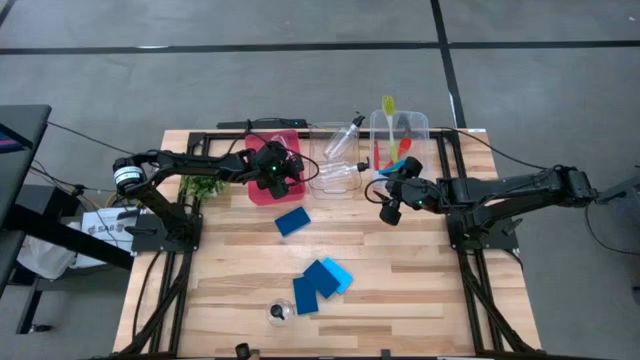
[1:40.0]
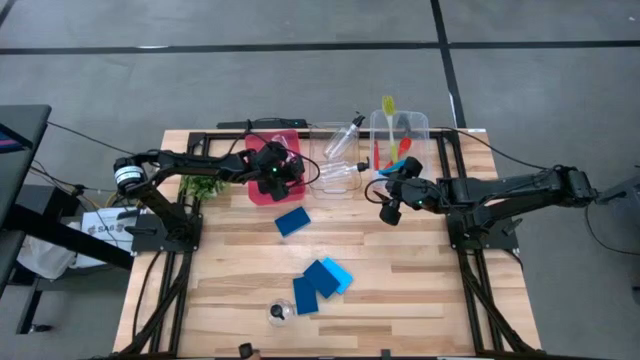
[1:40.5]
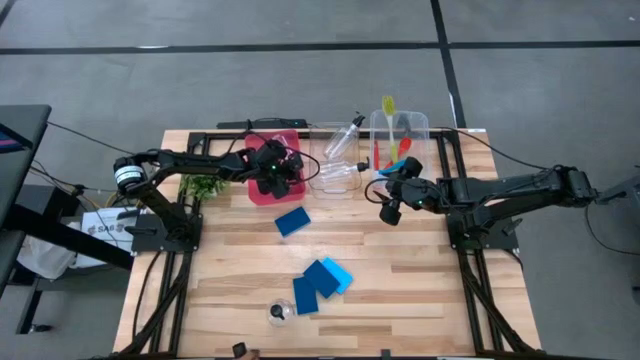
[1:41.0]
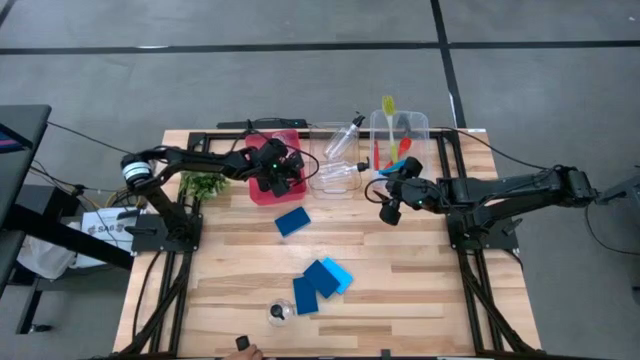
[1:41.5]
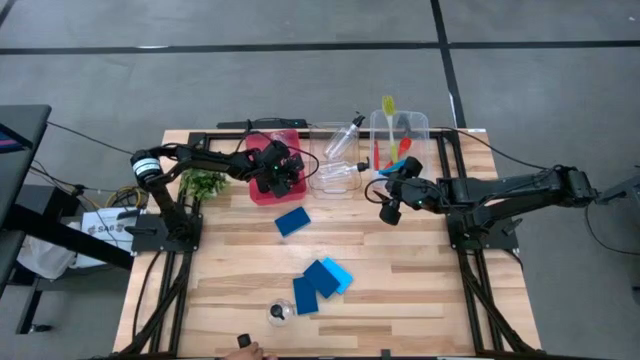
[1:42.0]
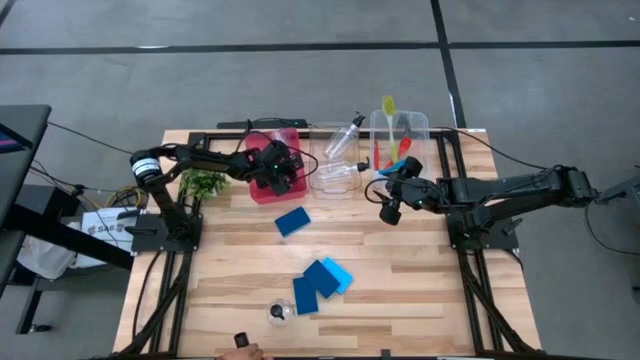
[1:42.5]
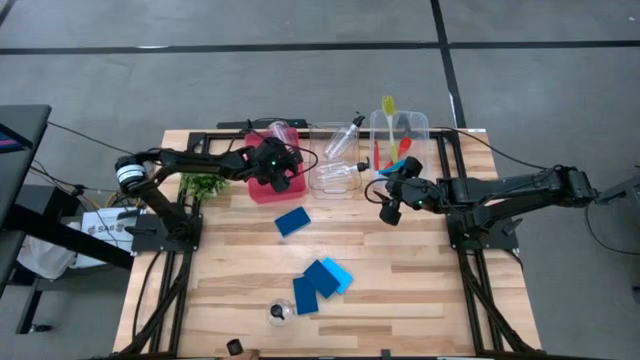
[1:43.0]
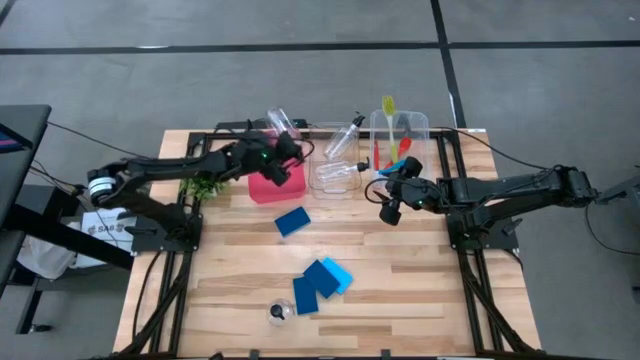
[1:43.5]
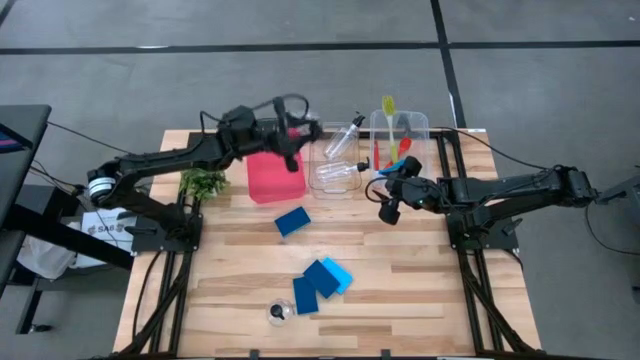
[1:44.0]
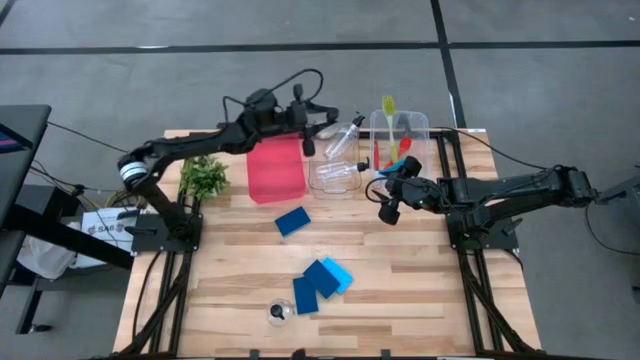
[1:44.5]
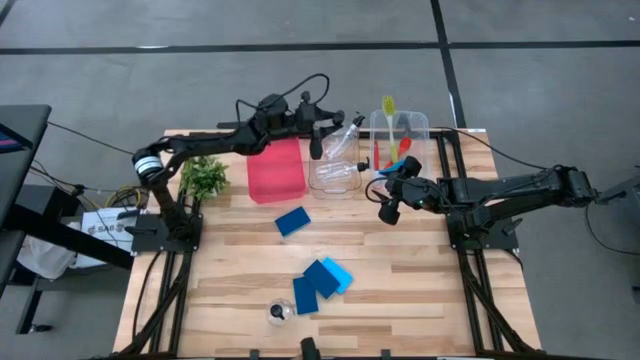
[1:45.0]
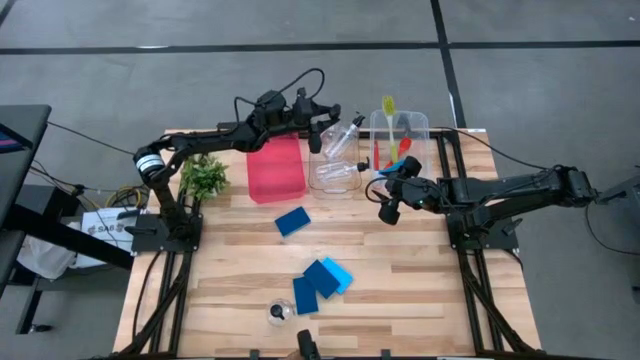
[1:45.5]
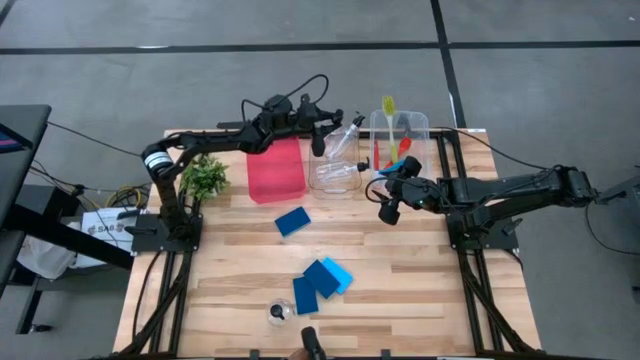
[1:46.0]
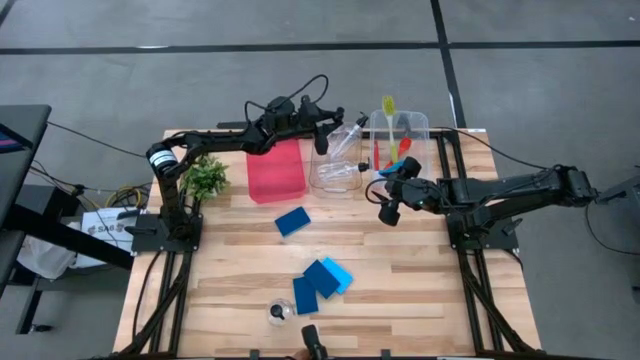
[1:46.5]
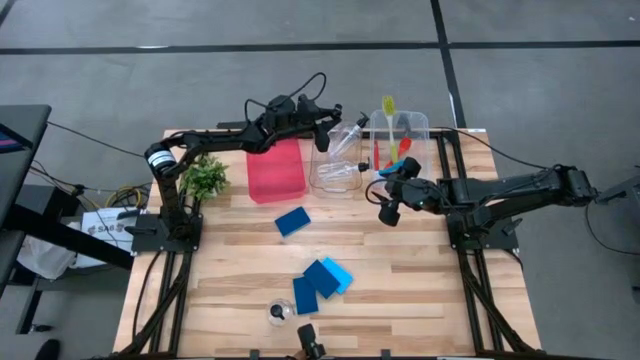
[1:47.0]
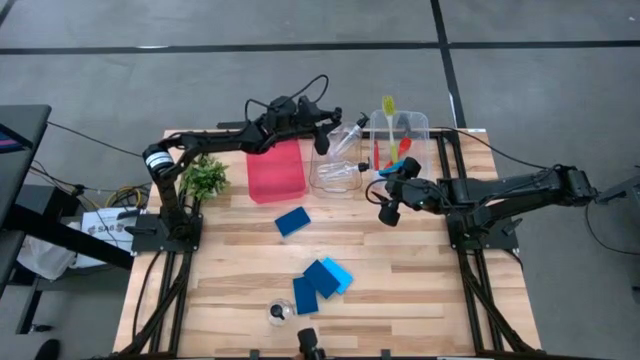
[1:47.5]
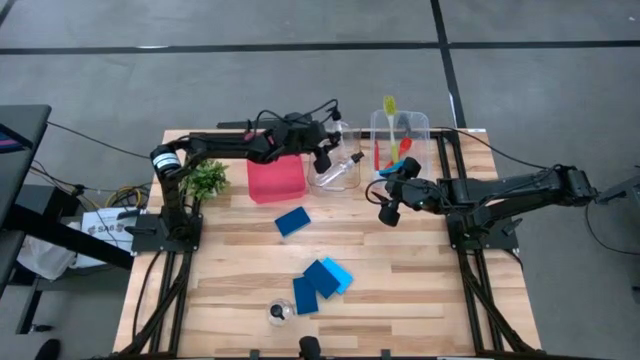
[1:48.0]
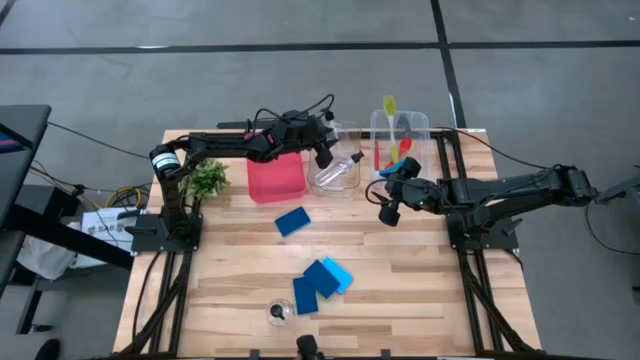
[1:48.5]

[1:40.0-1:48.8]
Task: Pick & Place Kitchen Sink Supplies
Put the soap dispenser into the left transparent bin

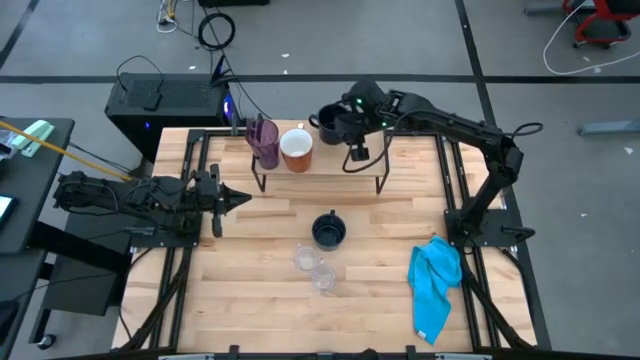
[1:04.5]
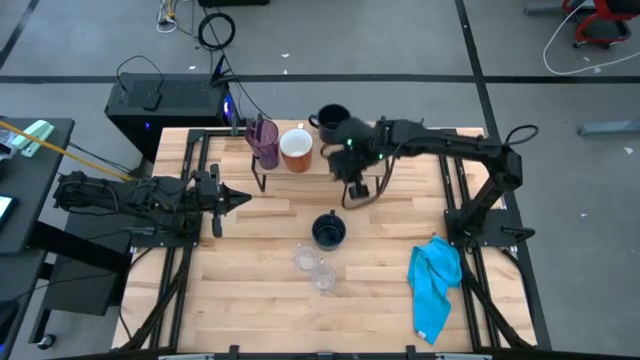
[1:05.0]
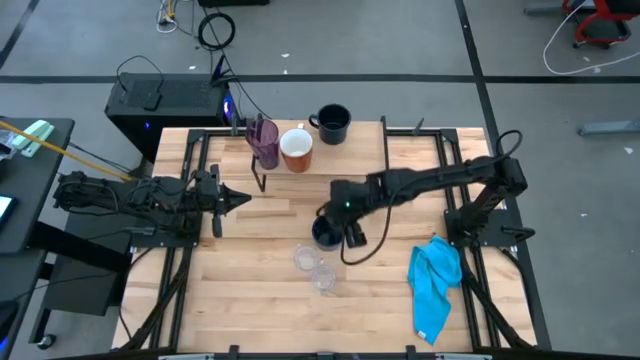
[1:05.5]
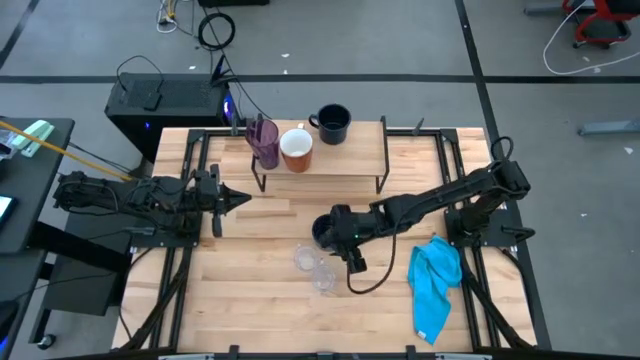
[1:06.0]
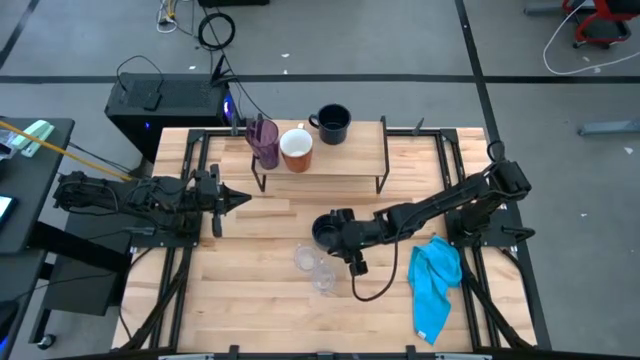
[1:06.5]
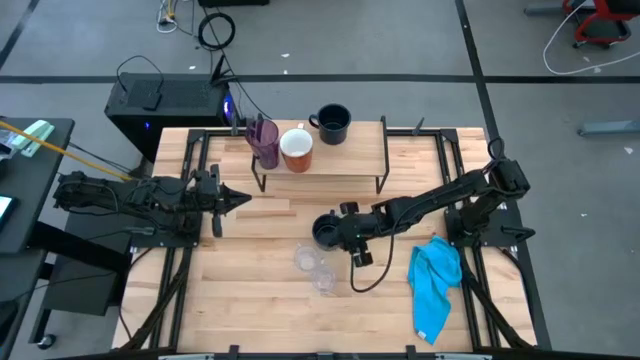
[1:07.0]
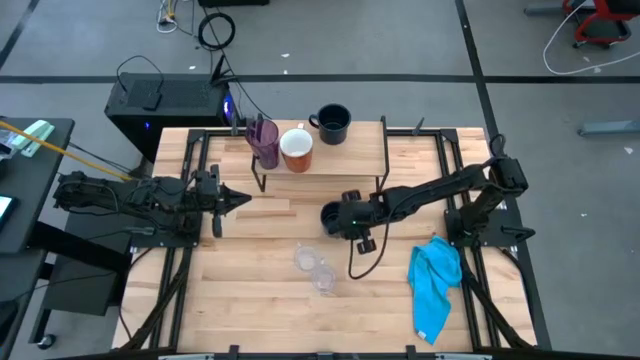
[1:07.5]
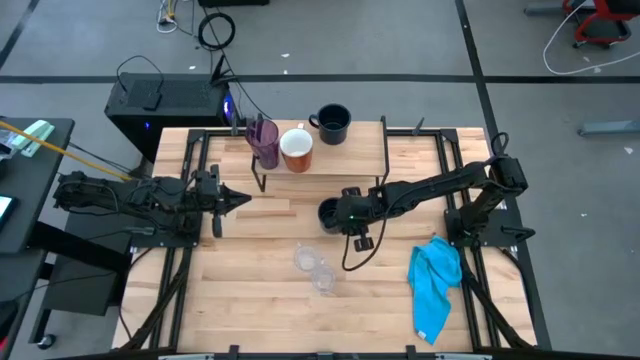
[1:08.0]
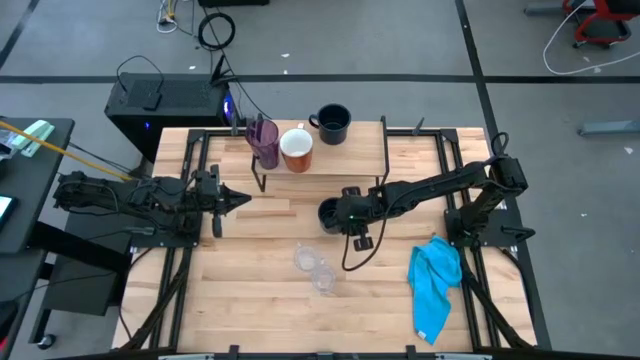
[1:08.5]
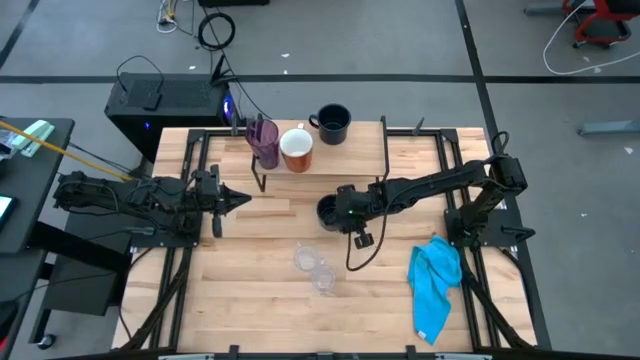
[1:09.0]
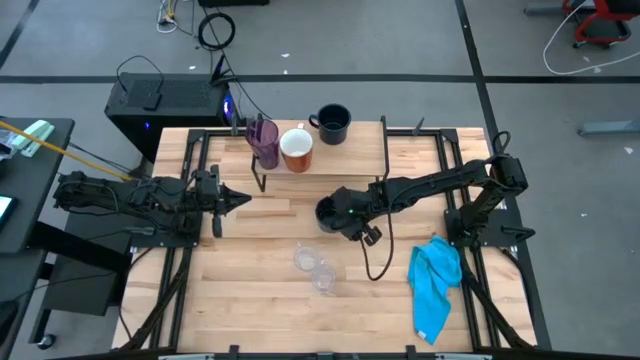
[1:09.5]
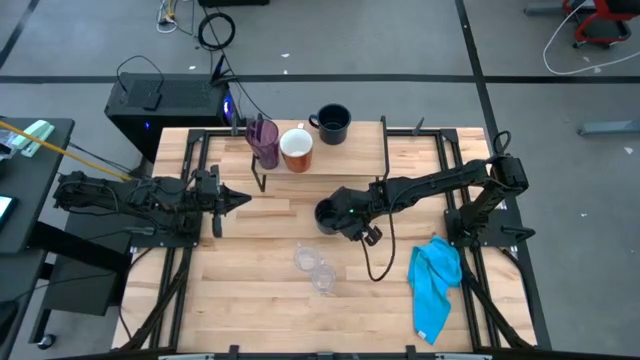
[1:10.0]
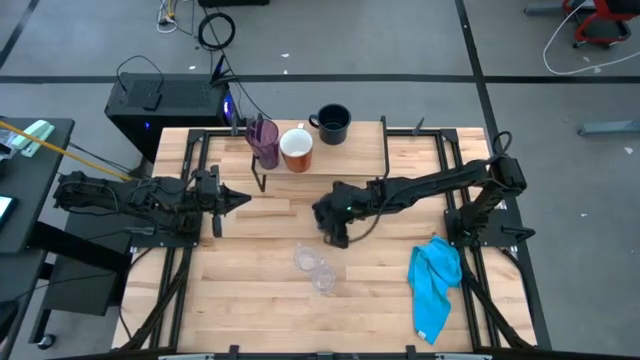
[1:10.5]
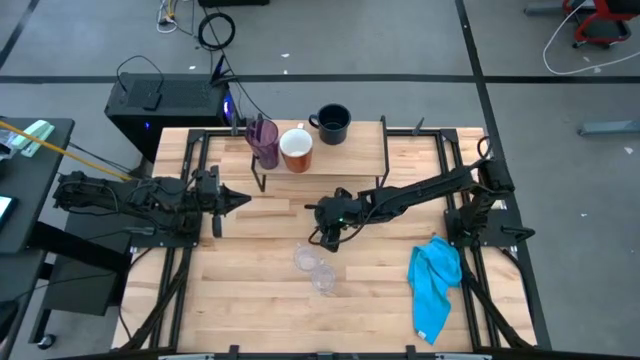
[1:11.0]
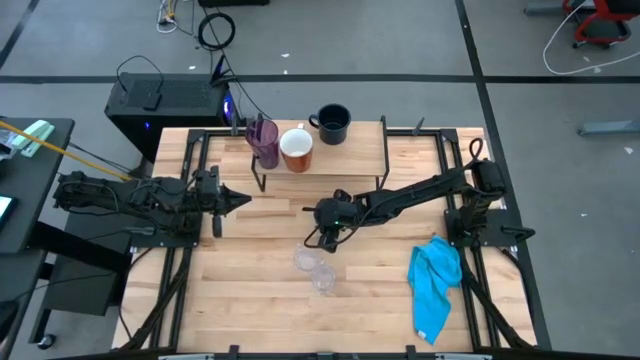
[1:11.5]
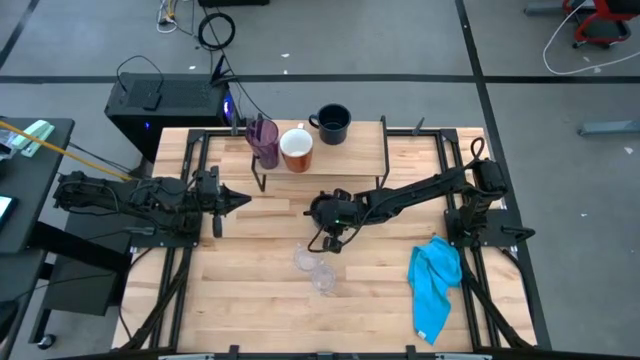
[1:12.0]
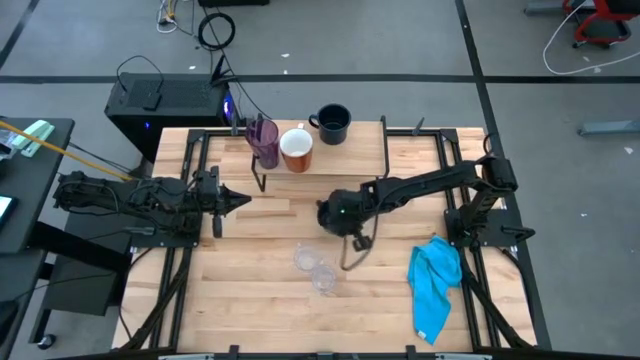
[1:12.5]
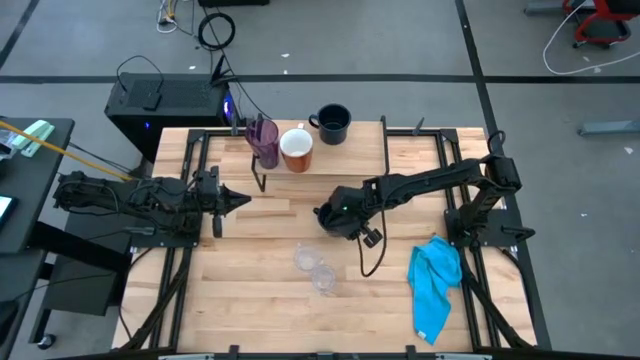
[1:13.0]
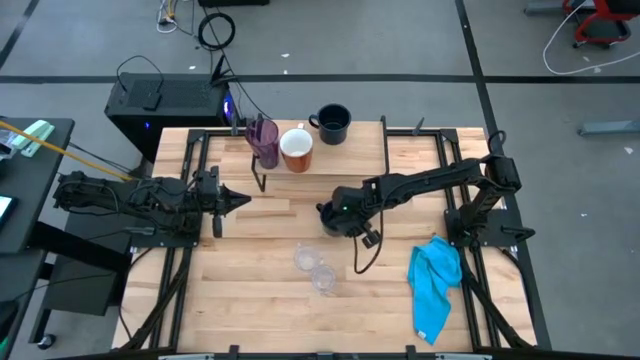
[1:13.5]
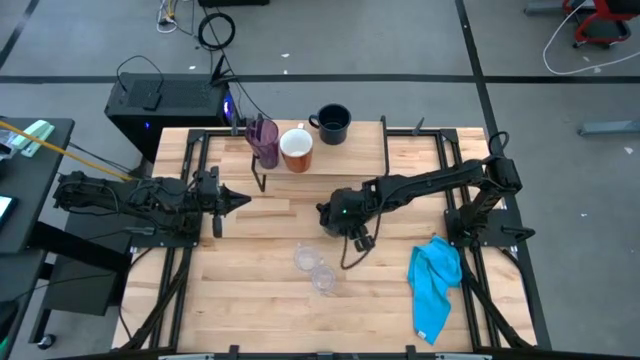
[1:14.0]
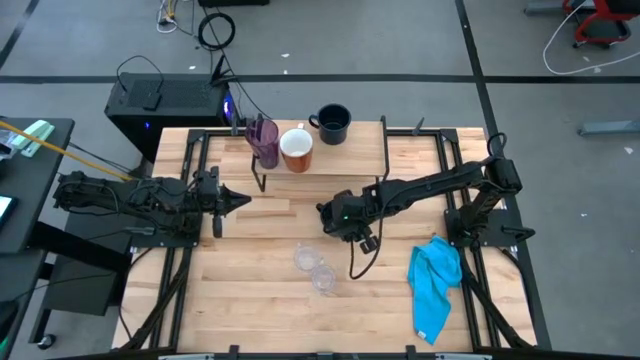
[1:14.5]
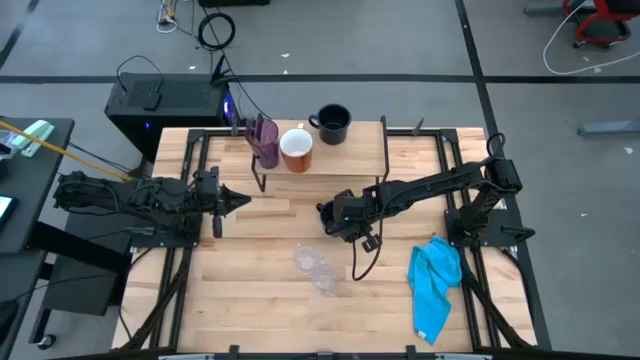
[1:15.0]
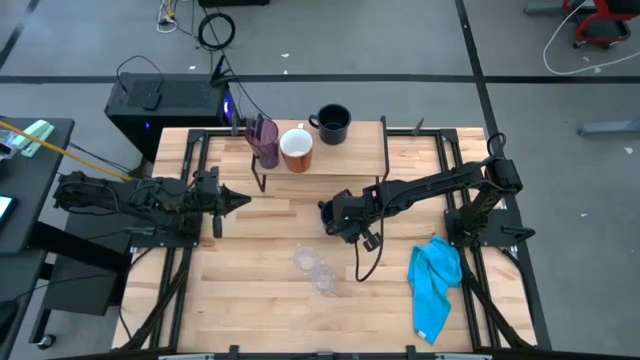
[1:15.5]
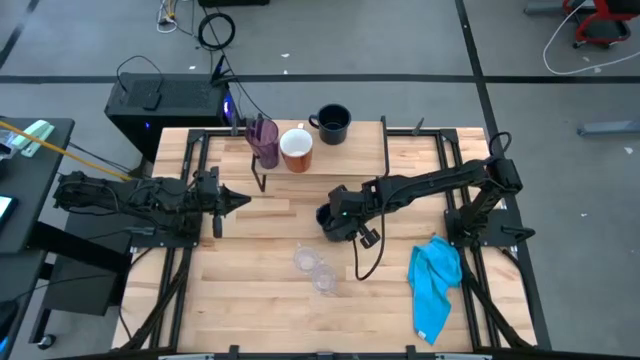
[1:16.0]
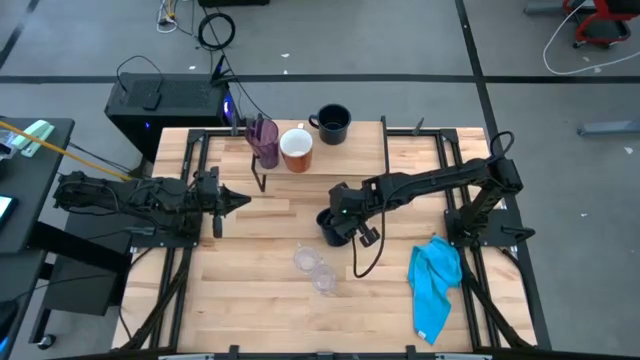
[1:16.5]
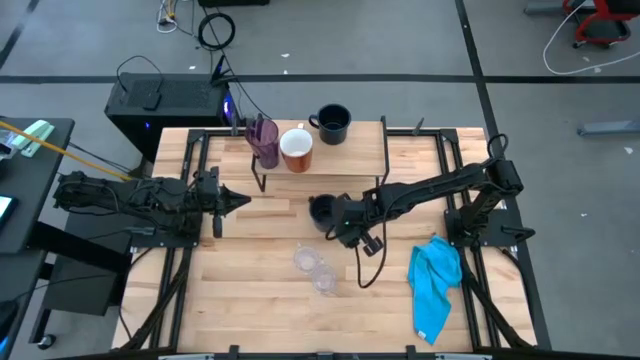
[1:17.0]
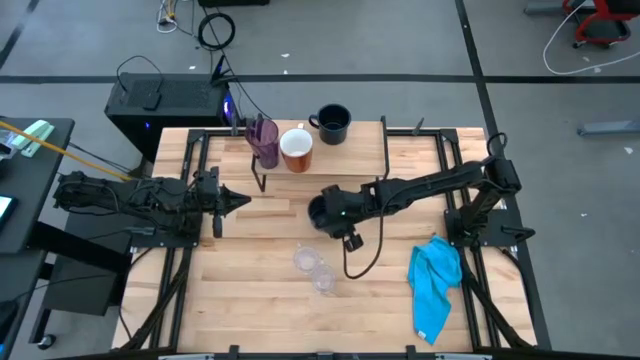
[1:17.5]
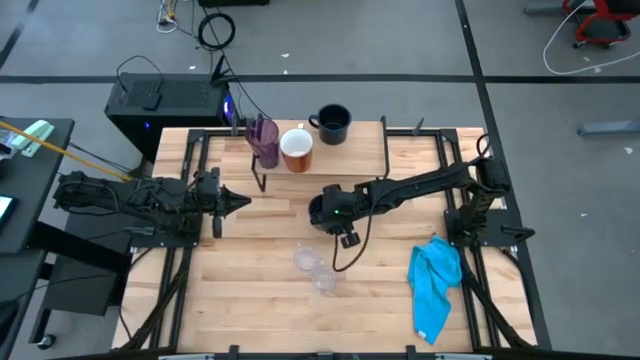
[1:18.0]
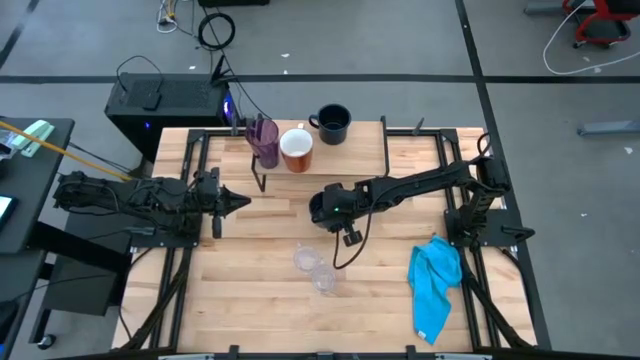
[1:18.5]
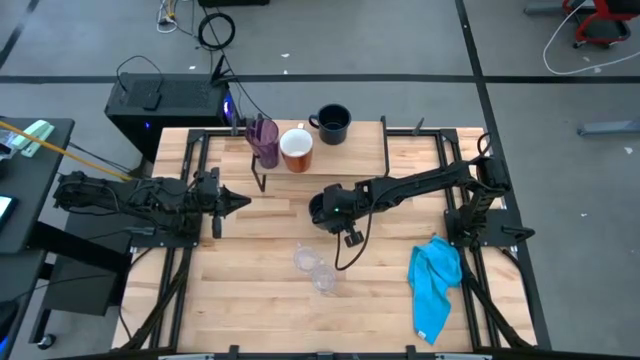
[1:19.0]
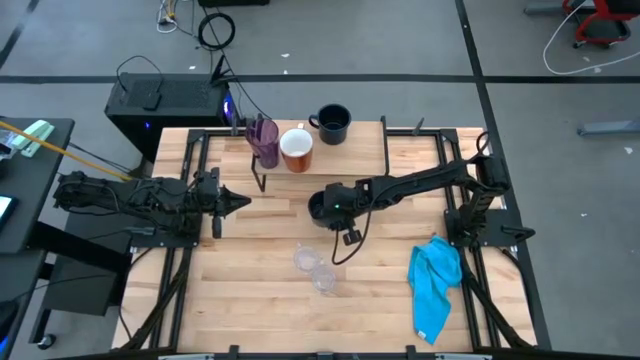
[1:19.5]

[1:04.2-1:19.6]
Task: Stack small to large cups/mugs on shelf
Put the dark blue mug on the shelf
